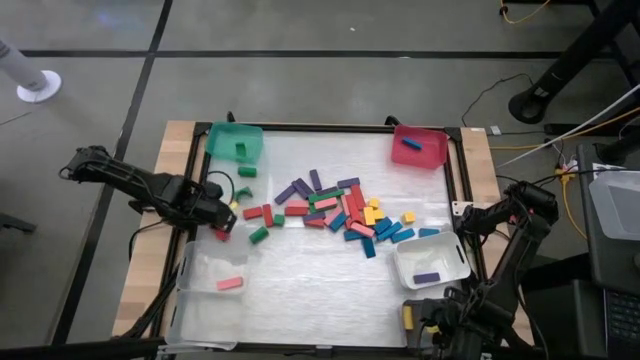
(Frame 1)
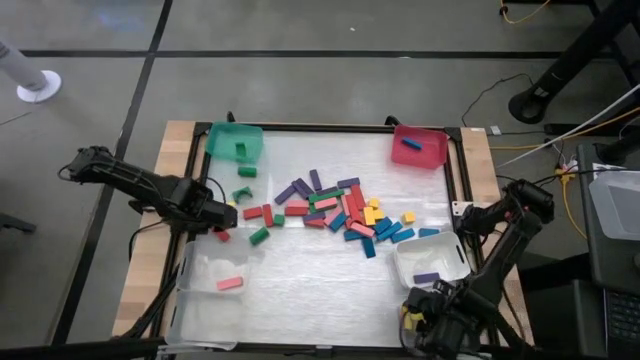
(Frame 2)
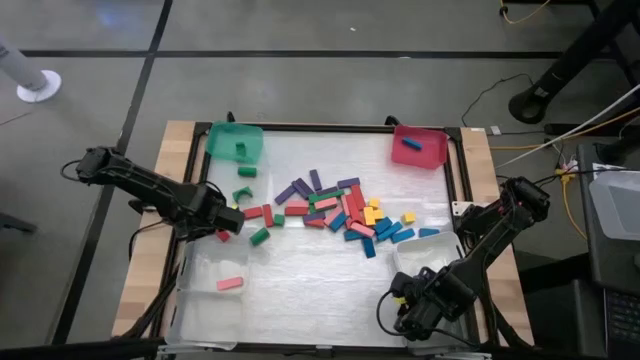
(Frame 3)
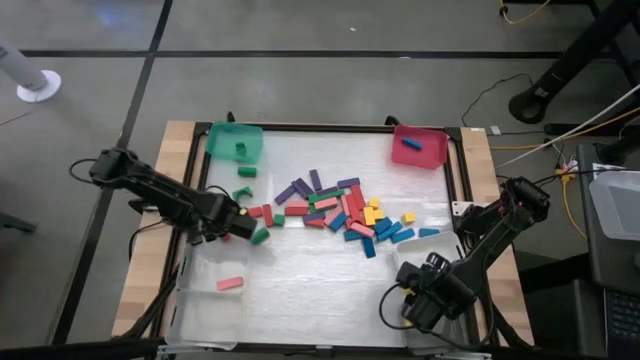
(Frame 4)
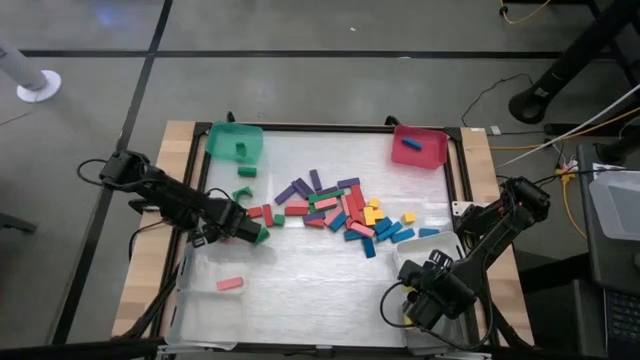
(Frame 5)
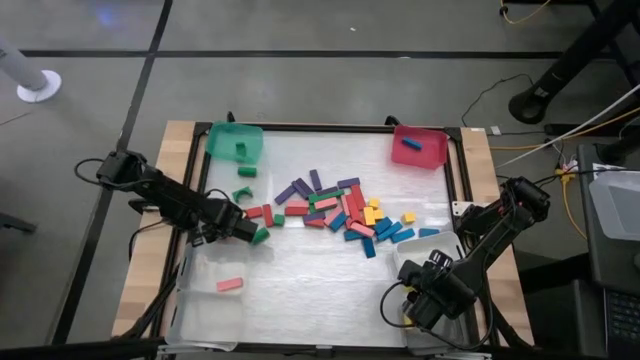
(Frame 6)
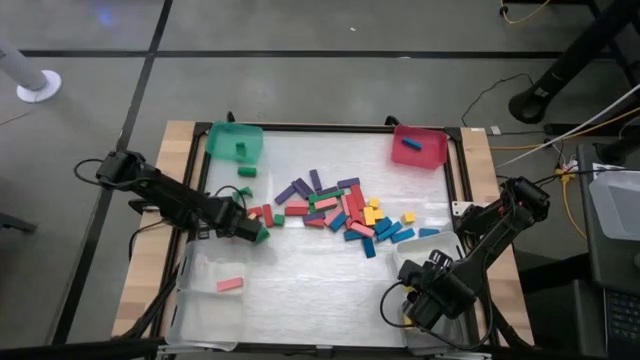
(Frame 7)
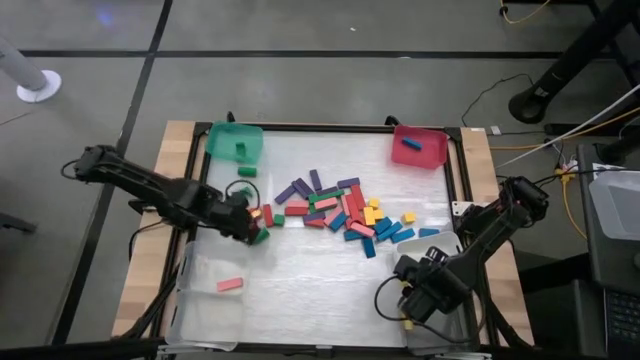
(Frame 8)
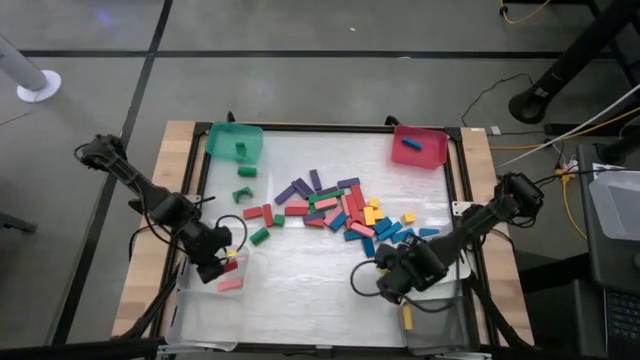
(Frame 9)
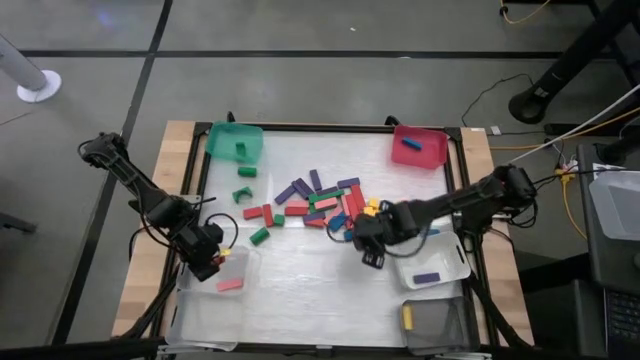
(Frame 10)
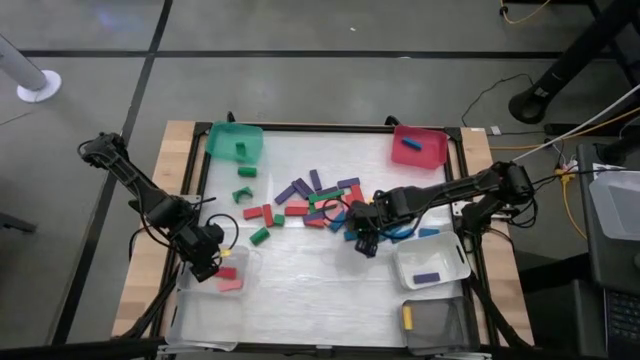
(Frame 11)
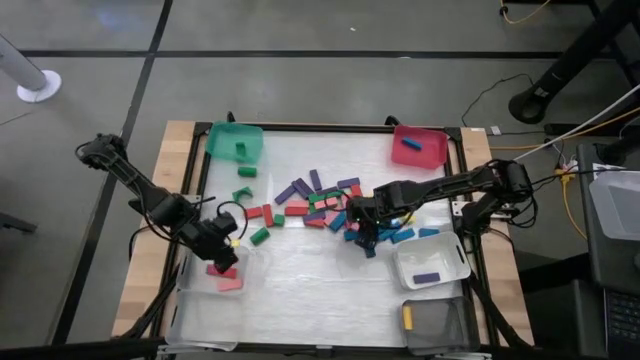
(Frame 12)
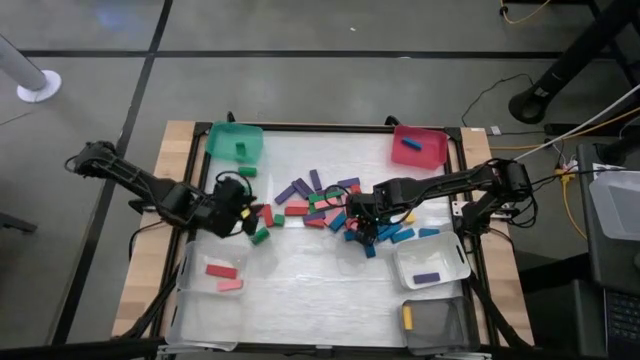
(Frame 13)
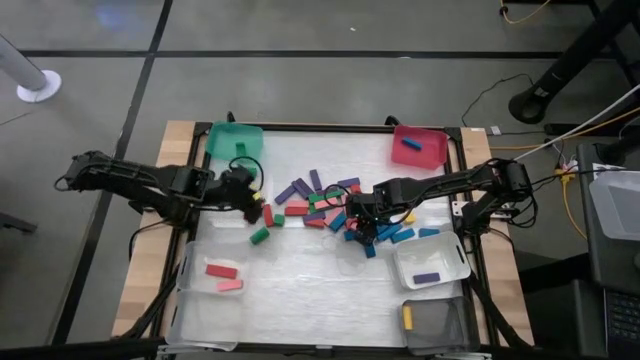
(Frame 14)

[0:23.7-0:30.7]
Task: Sort blocks
Put the red block into the bottom transparent bin

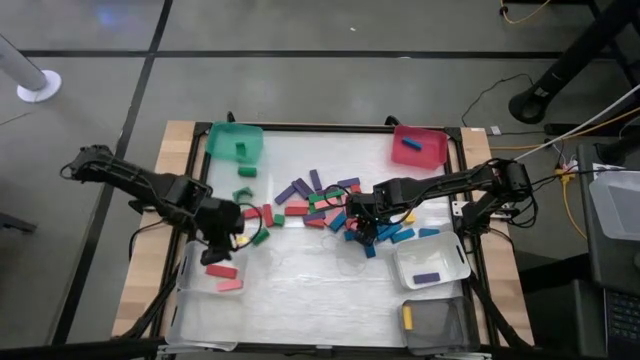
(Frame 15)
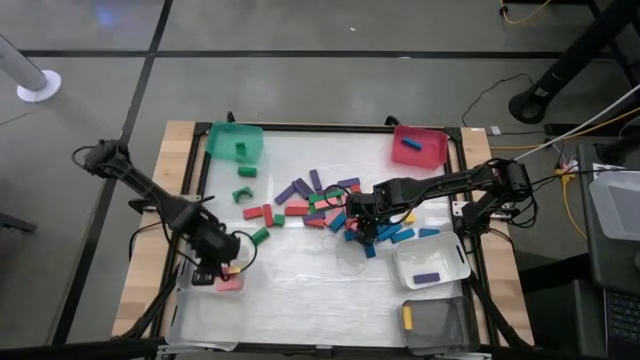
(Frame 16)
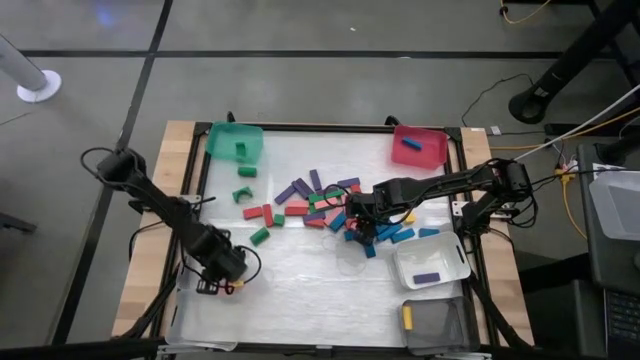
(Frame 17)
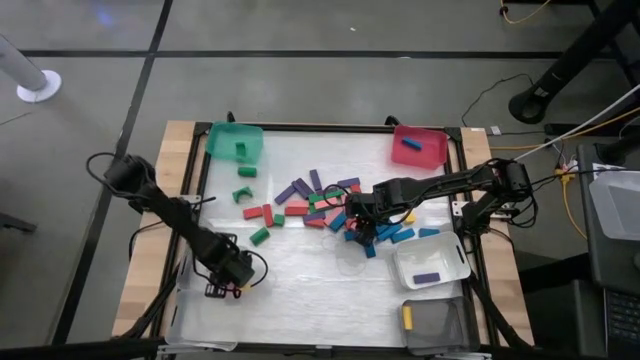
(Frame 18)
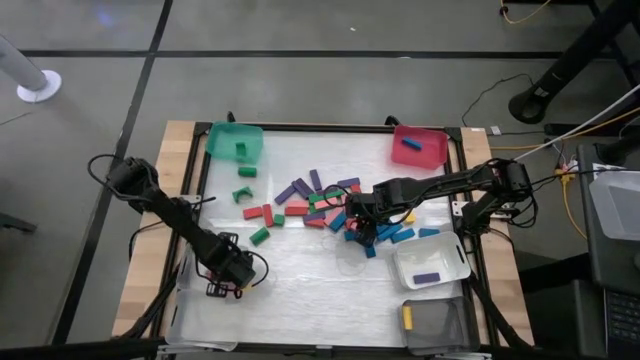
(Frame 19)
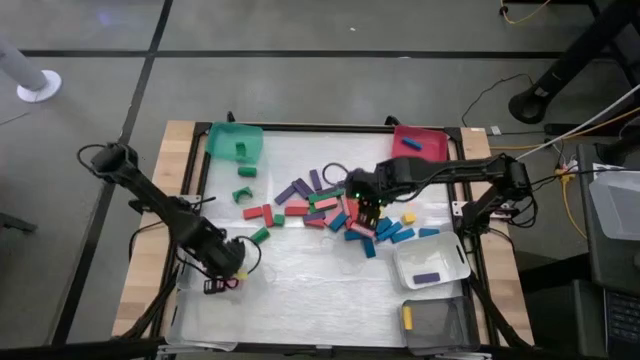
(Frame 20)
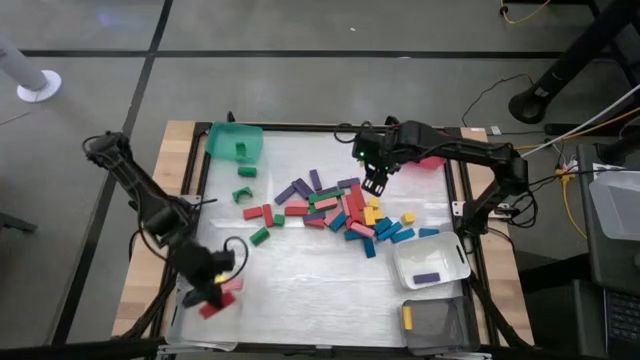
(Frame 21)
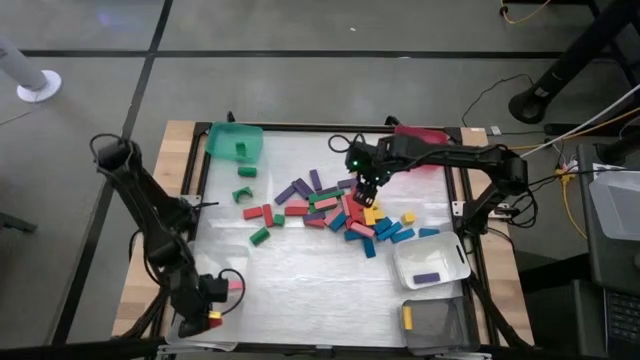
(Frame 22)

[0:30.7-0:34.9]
Put the red block into the bottom transparent bin

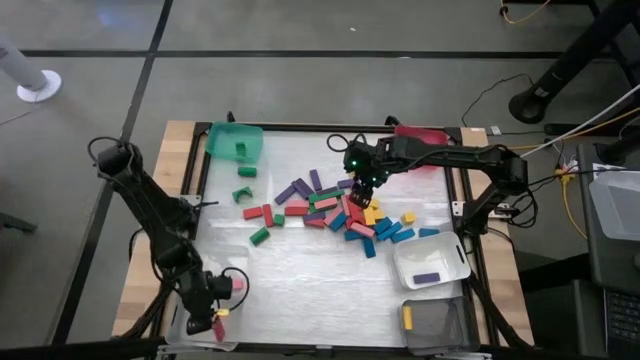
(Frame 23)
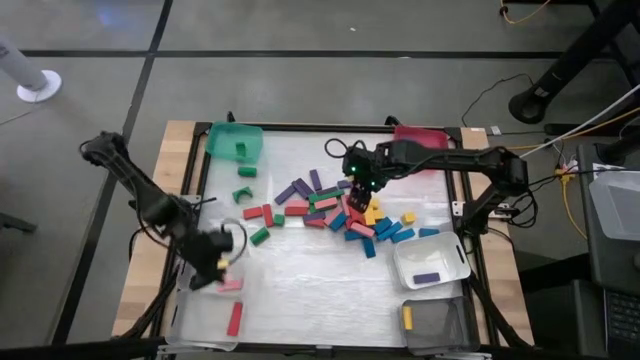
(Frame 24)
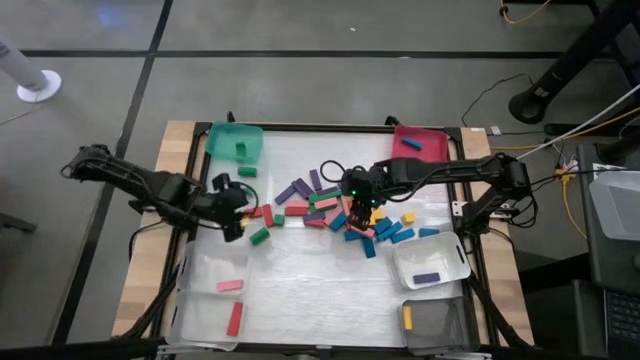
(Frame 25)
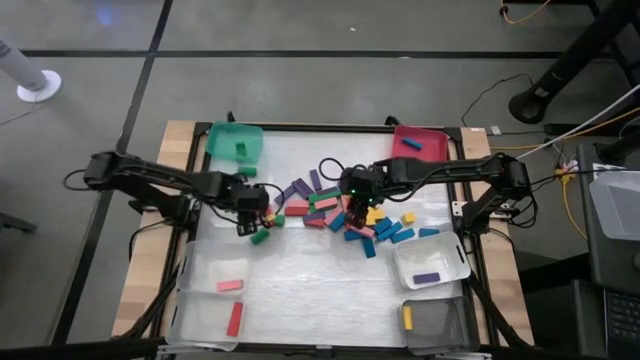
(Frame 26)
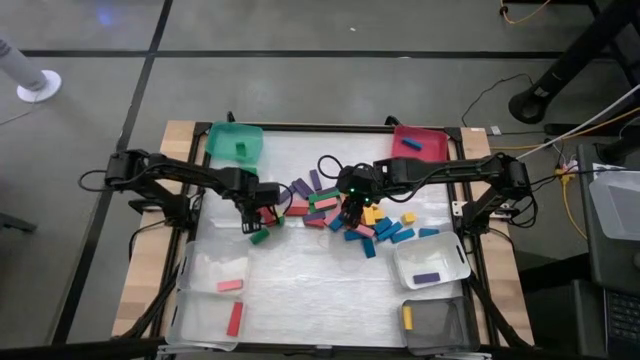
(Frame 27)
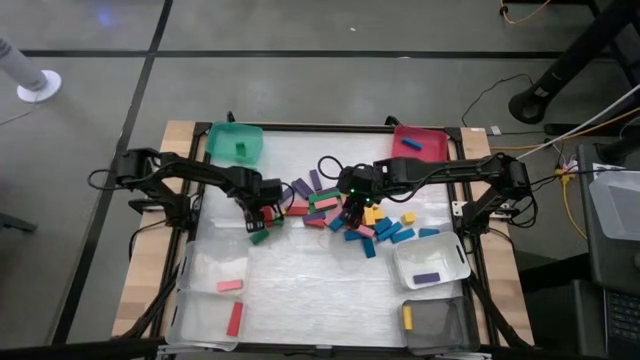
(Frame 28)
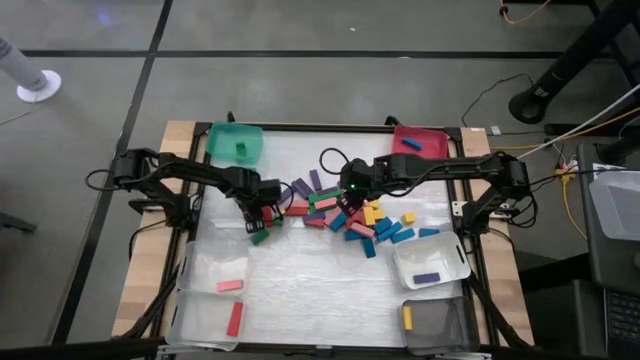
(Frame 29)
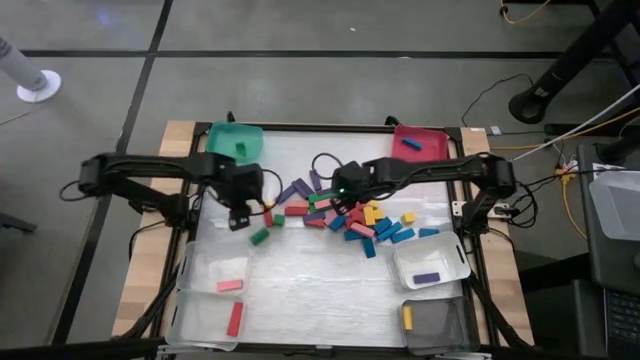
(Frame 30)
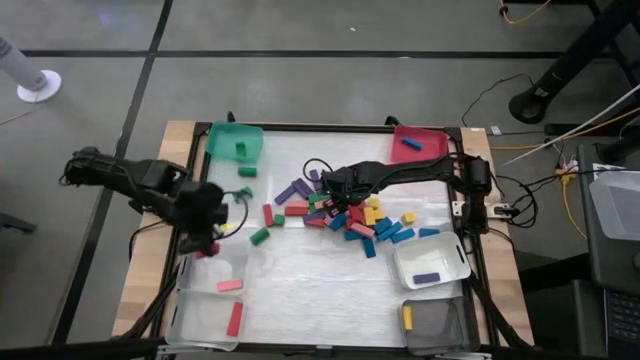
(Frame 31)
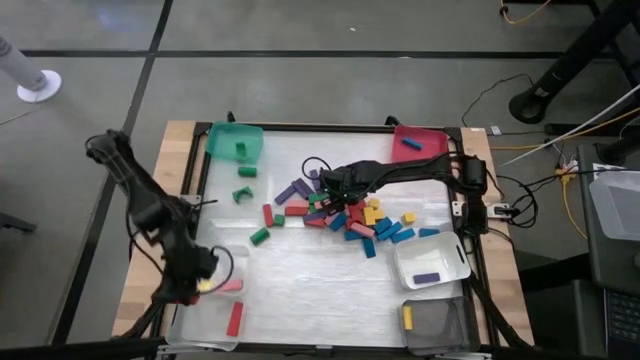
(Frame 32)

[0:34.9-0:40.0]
Put the red block into the bottom transparent bin

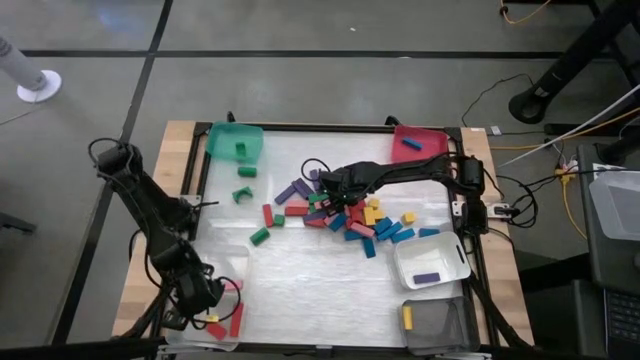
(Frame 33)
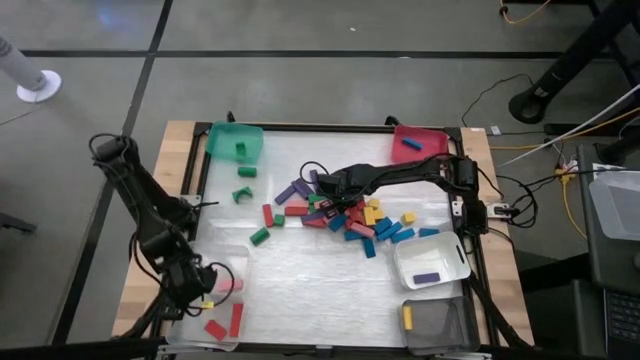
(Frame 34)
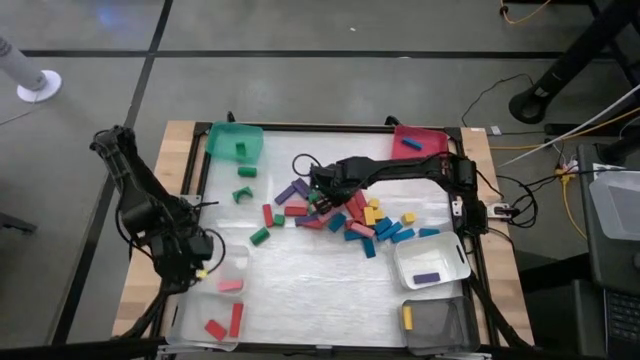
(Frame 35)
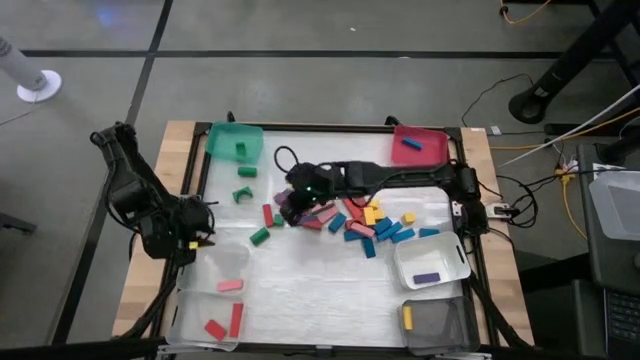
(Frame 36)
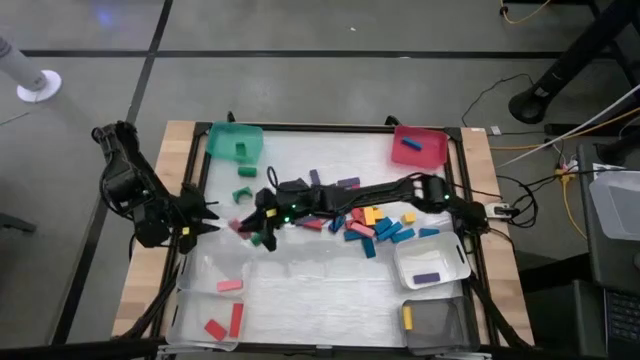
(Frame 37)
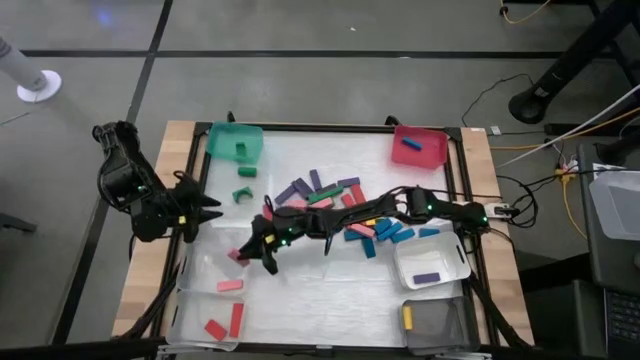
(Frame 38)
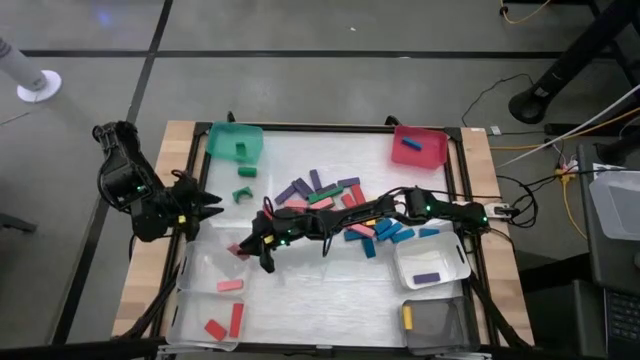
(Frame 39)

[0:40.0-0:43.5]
Put the pink block into the top transparent bin

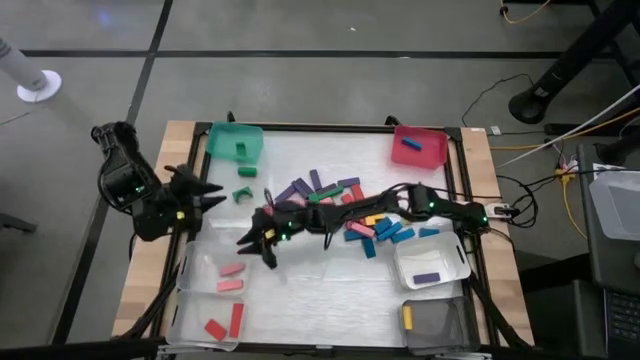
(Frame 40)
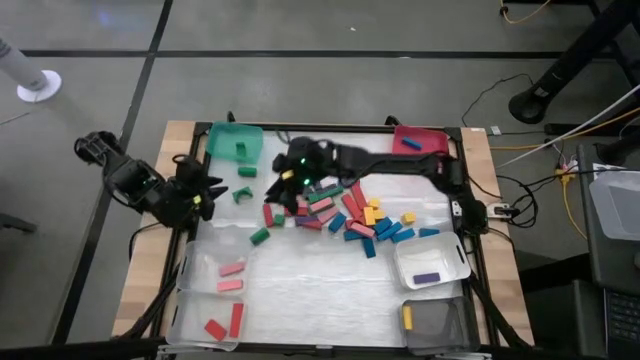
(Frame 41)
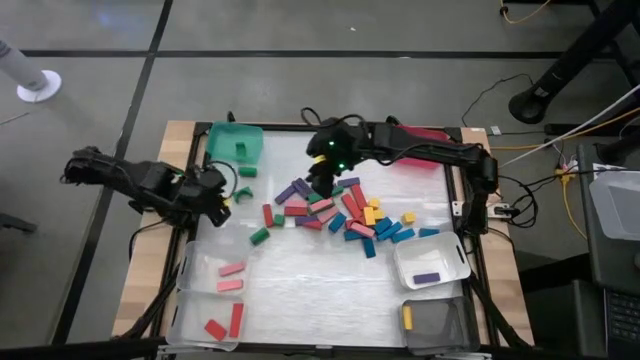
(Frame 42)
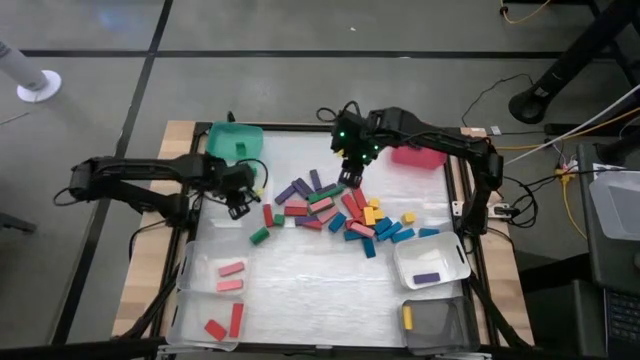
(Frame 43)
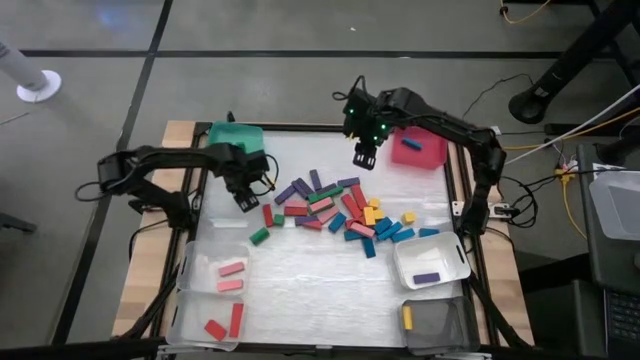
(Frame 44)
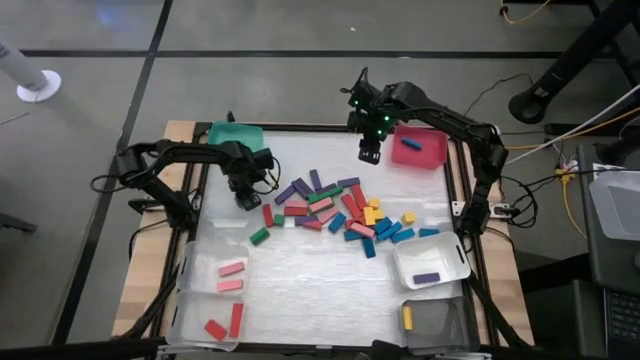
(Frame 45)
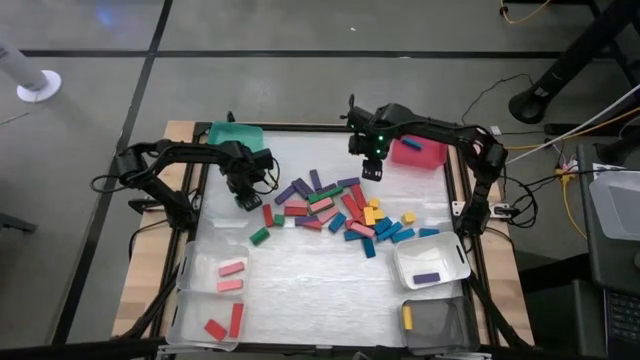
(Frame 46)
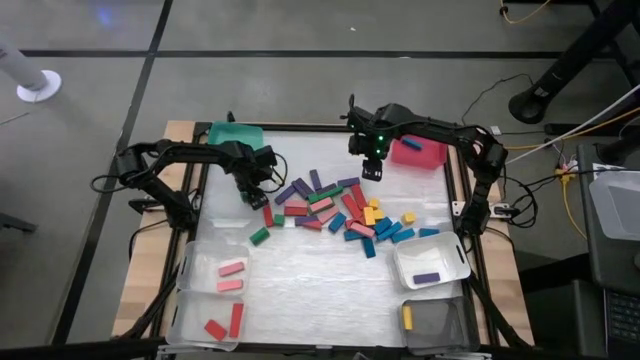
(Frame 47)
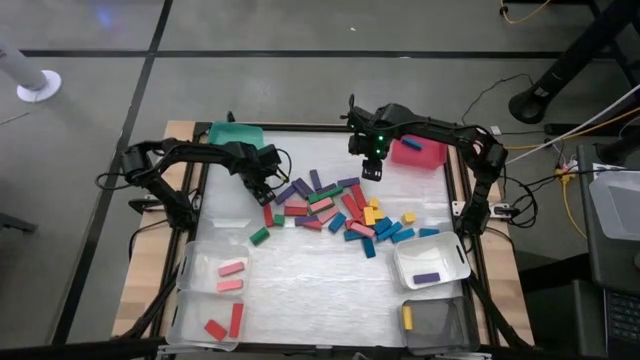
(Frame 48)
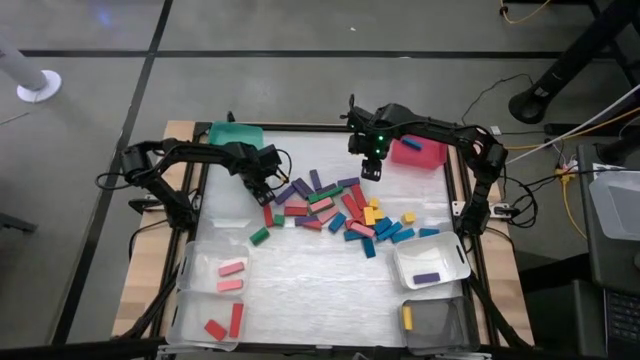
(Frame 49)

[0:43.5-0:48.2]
Put the green block into the green bin
